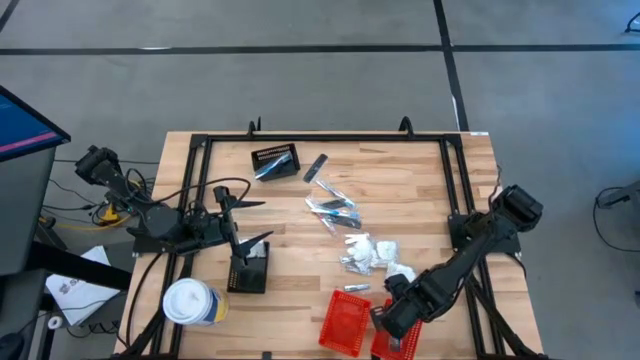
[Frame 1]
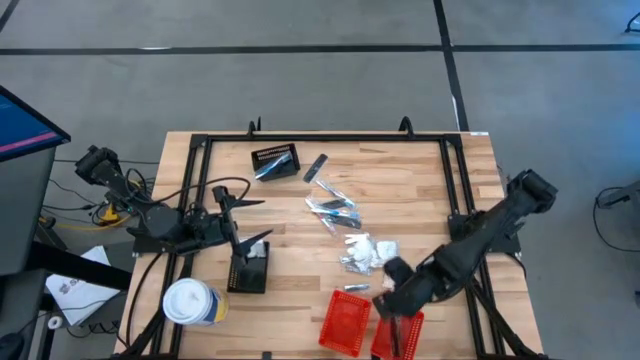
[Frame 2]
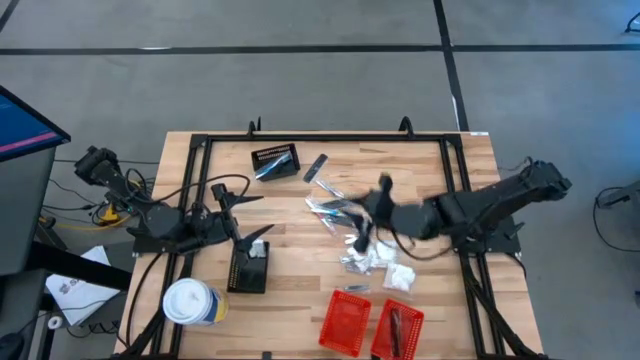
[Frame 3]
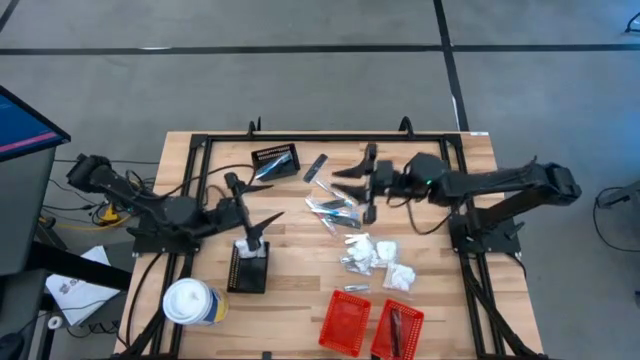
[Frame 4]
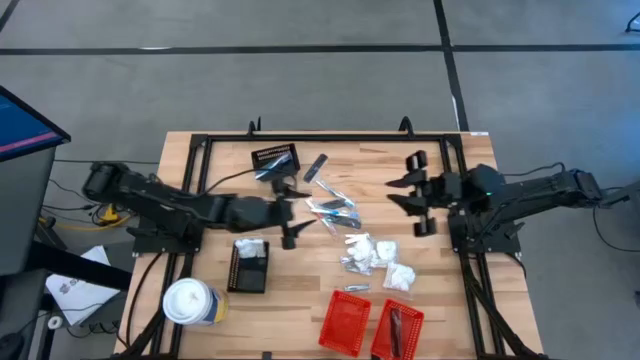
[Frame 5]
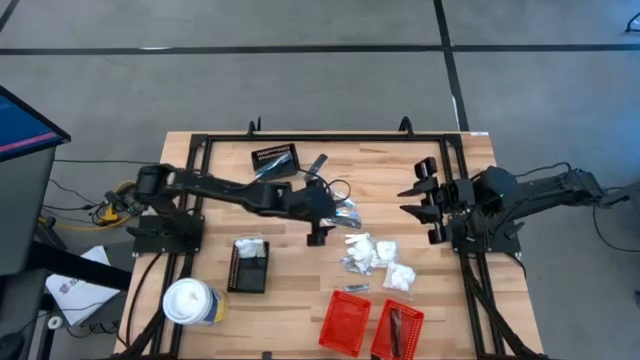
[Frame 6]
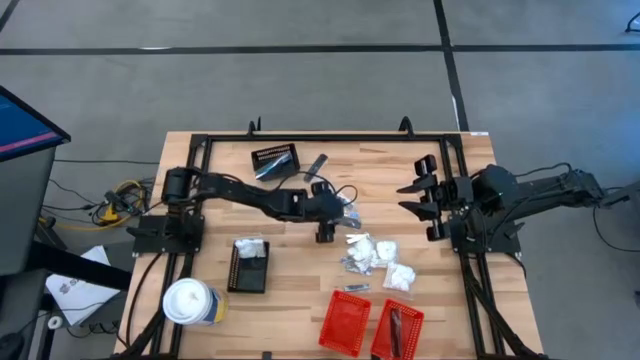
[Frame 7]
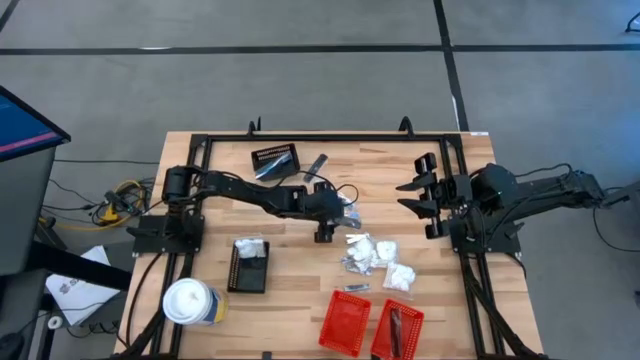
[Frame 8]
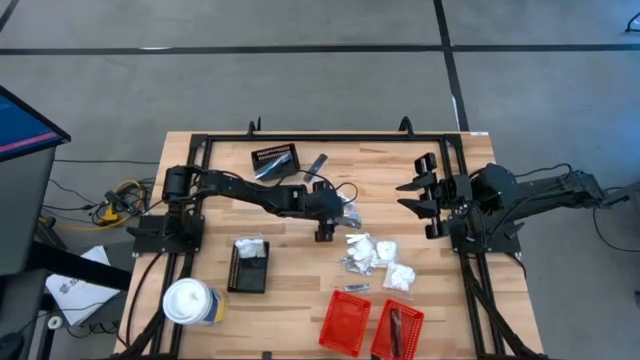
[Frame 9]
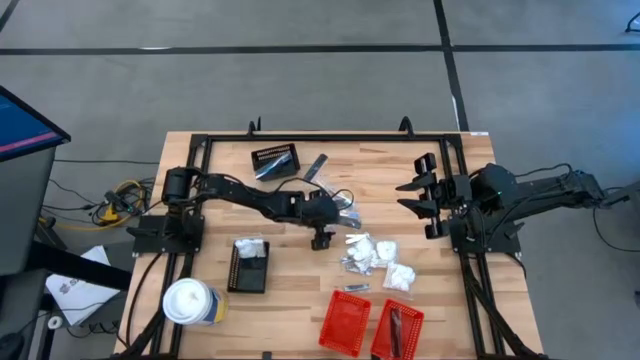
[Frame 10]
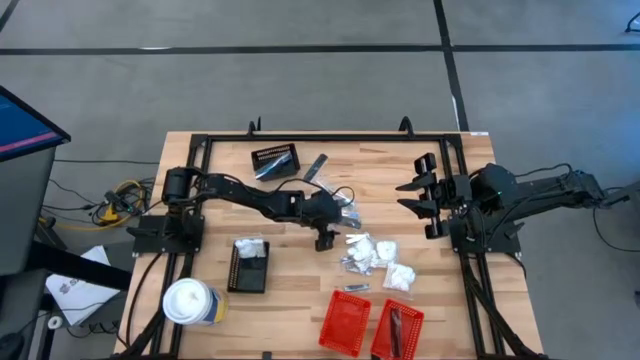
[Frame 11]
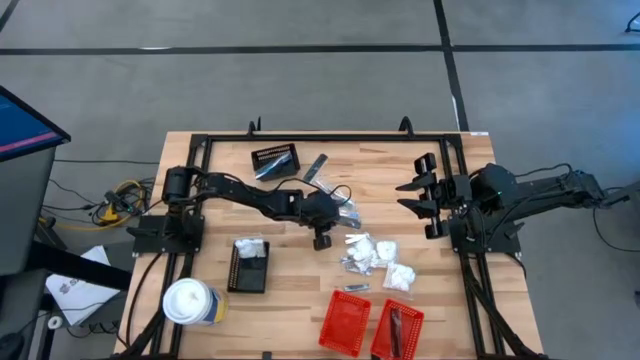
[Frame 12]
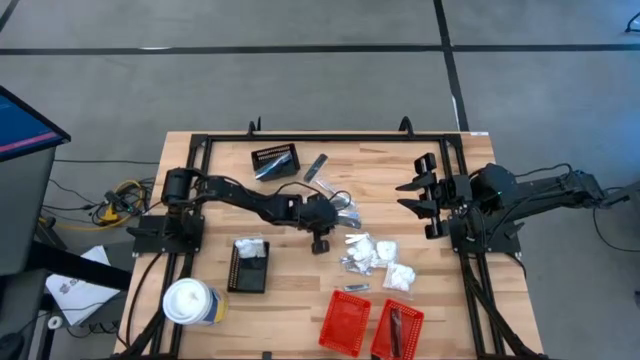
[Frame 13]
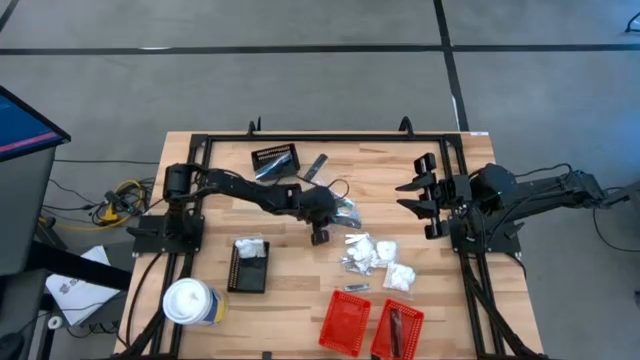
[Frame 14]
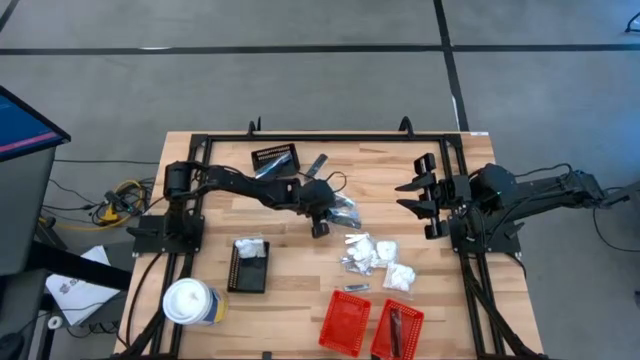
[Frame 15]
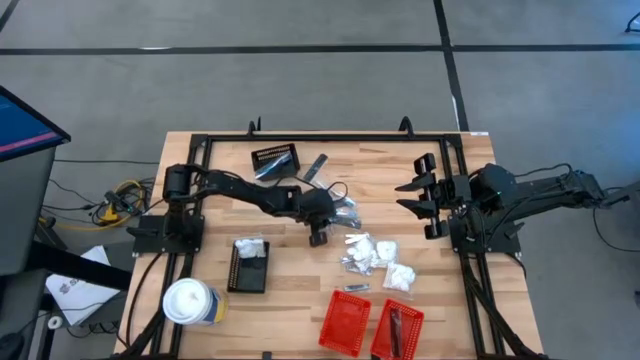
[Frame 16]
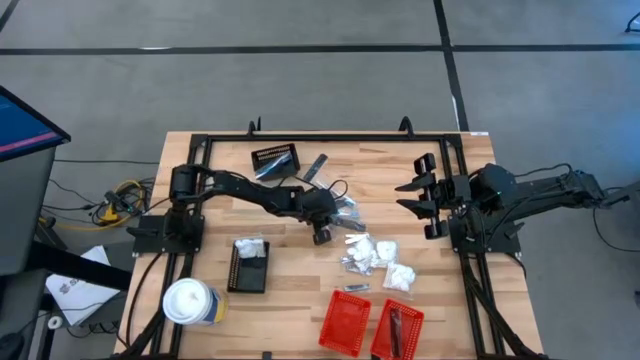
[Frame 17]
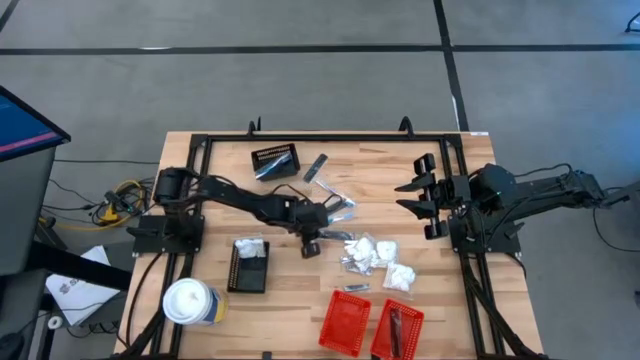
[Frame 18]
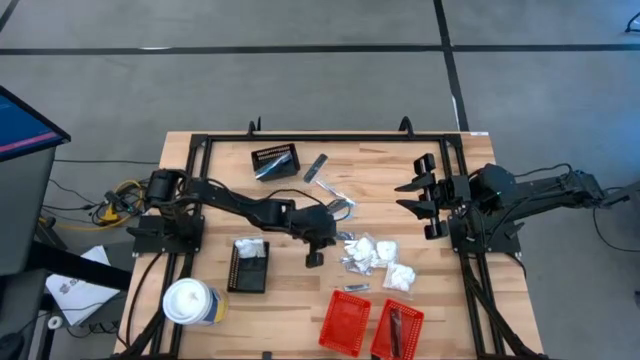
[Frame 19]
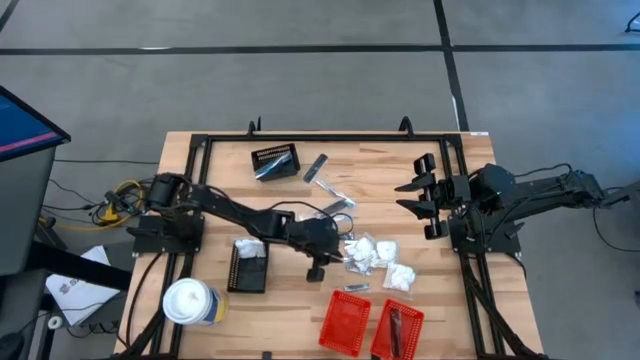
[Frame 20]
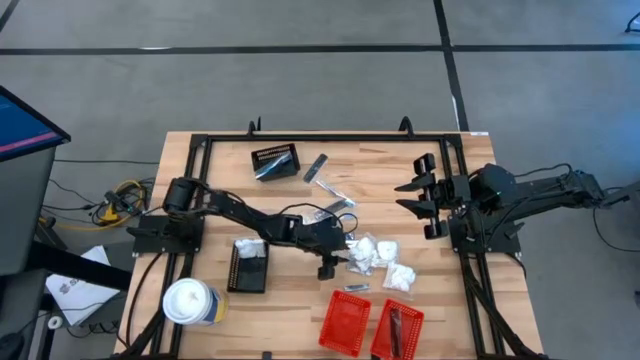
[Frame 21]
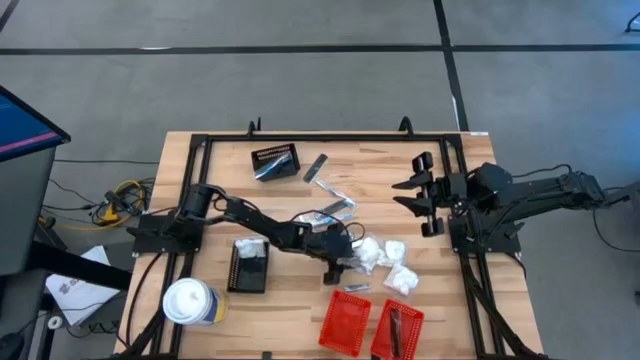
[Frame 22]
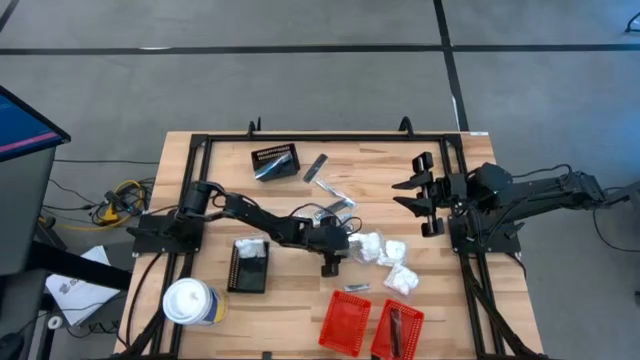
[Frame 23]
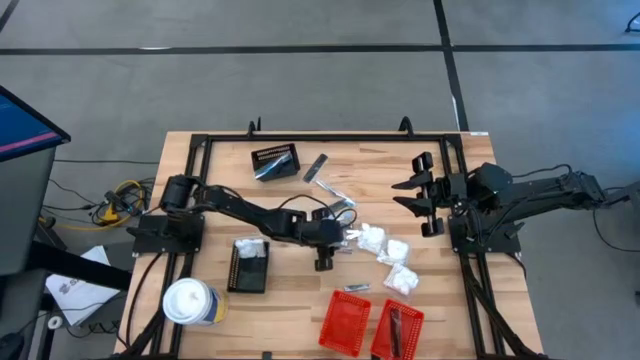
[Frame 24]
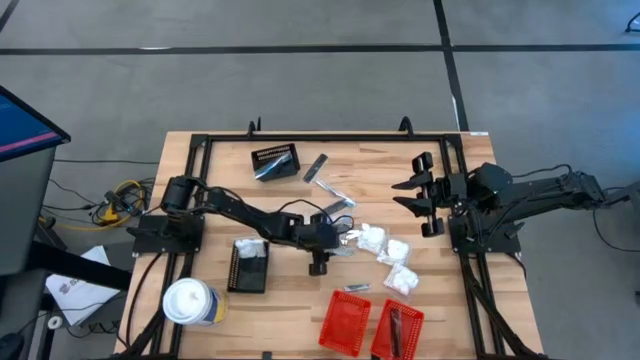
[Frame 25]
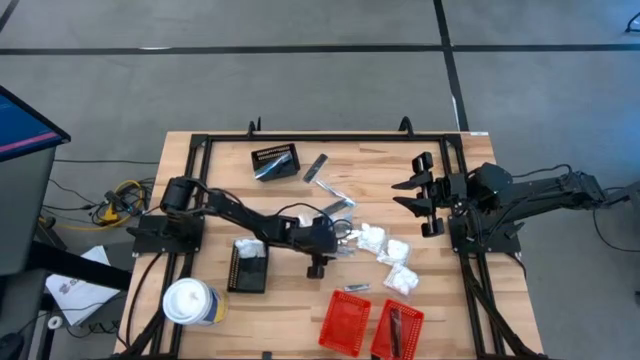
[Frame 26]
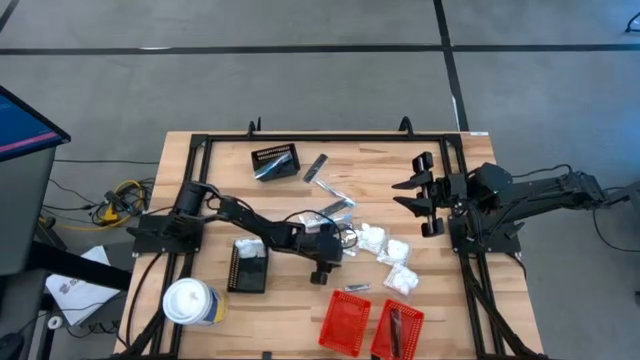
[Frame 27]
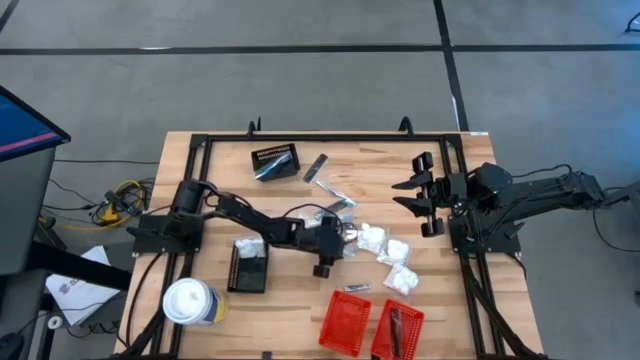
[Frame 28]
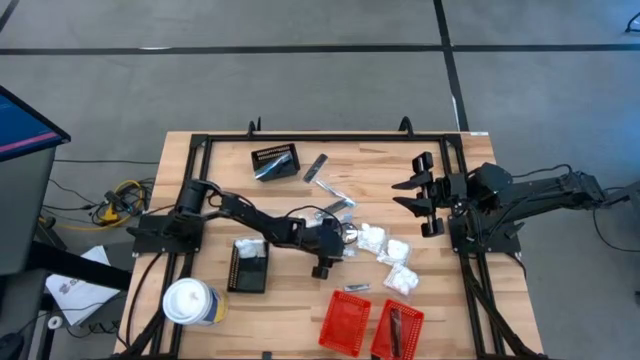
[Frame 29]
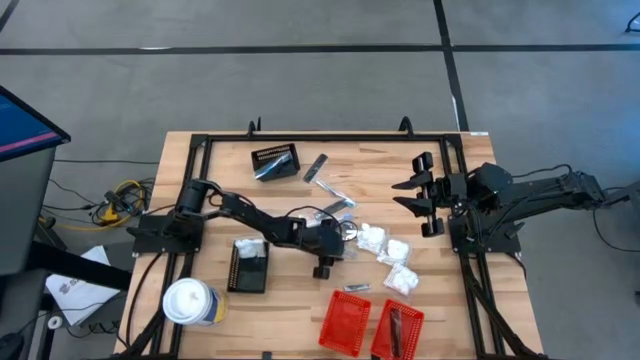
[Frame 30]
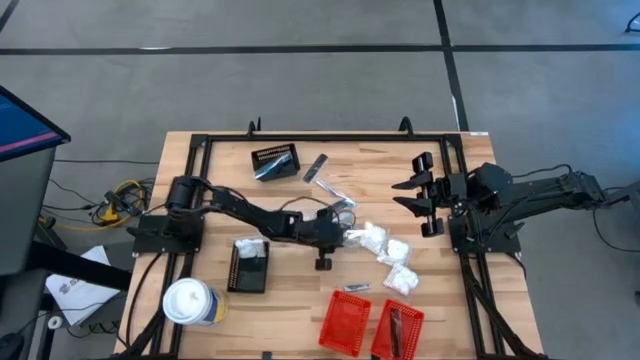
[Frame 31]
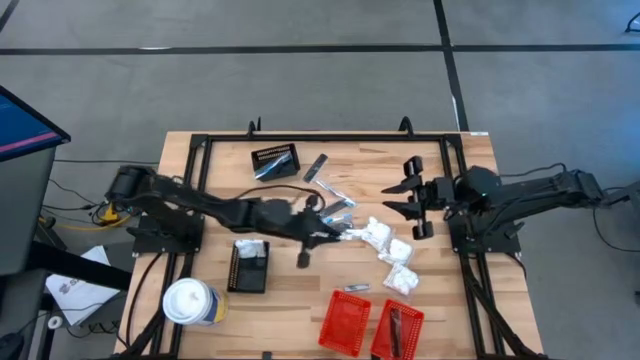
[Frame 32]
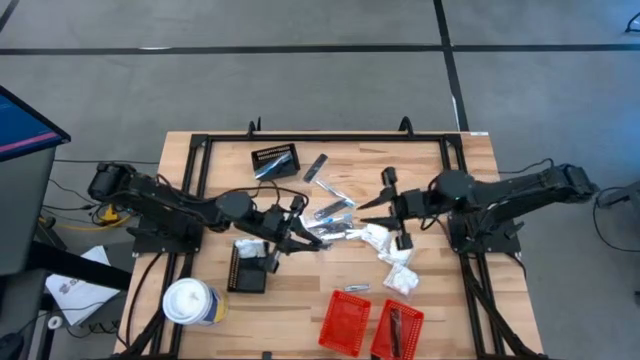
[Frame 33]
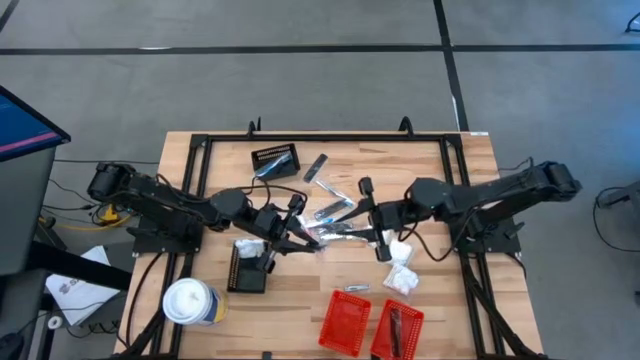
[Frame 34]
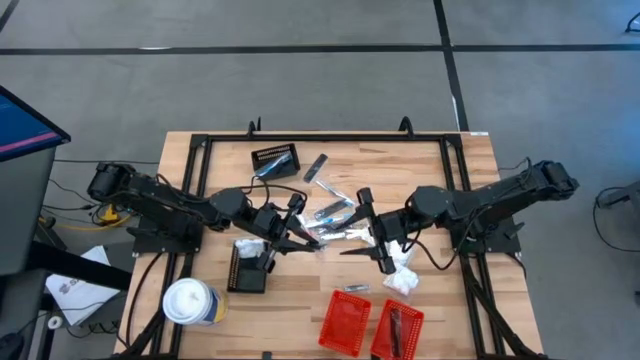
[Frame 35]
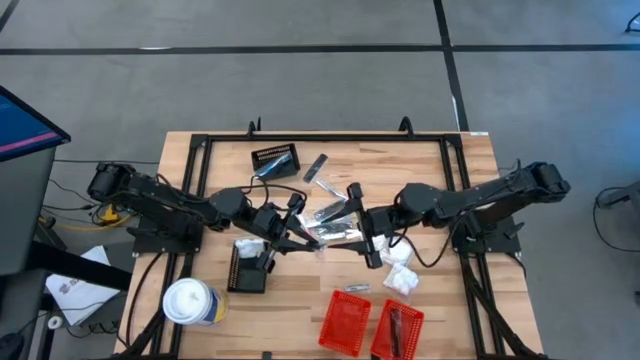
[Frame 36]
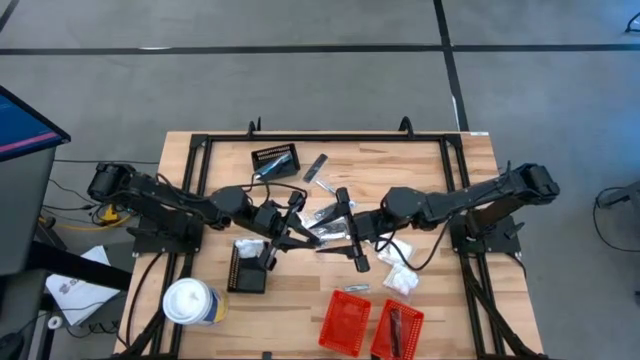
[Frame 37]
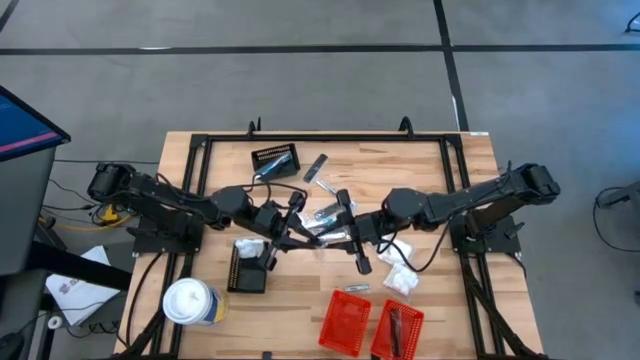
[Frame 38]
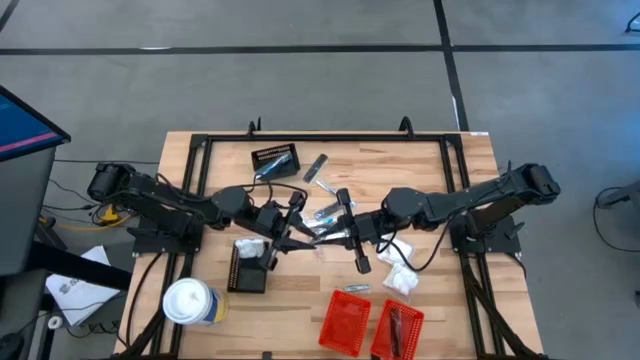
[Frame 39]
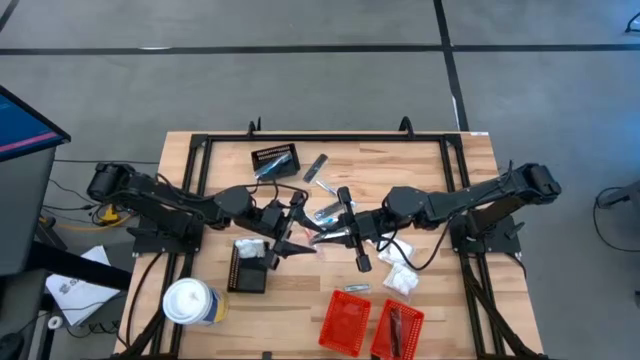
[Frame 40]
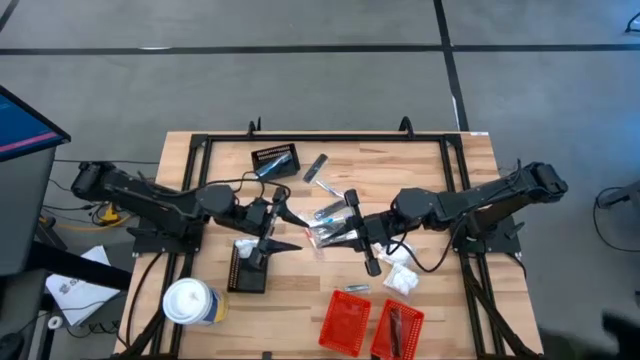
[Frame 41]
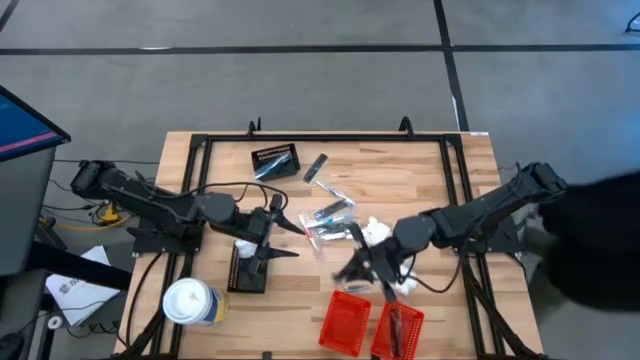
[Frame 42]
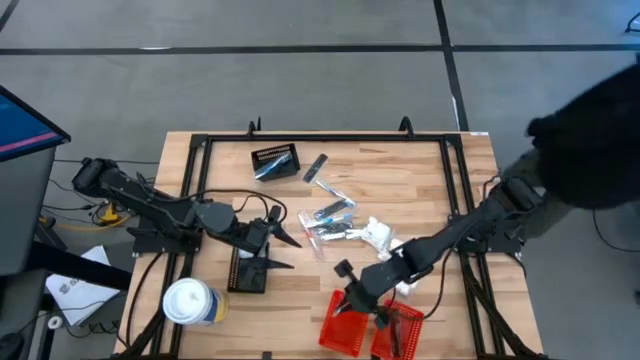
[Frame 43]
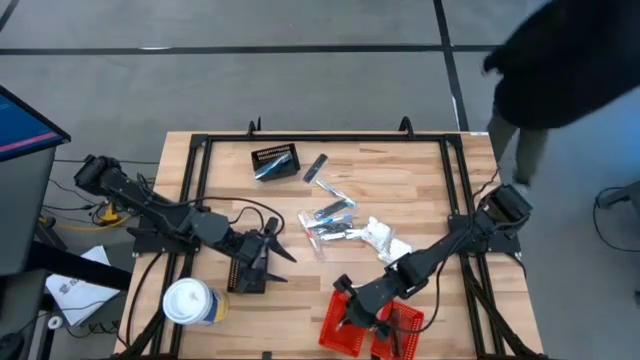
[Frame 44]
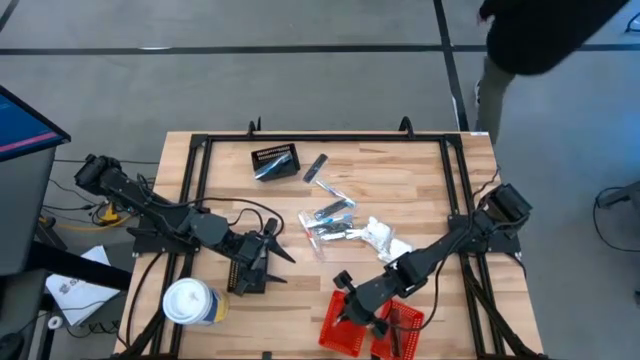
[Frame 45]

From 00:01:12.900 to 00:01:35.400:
Task: Pick & Place Travel size toiletries
Put the nail cutter into the left red bin
